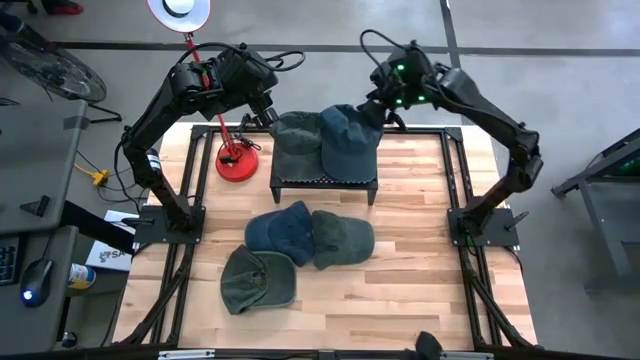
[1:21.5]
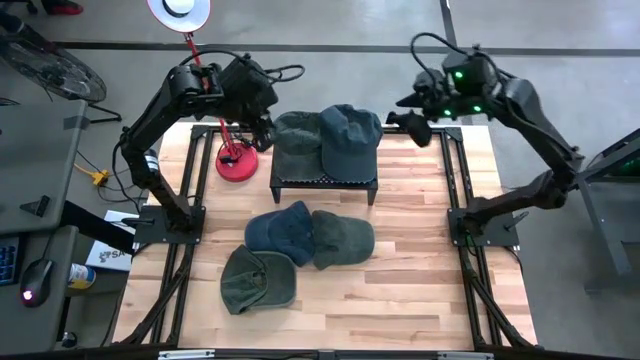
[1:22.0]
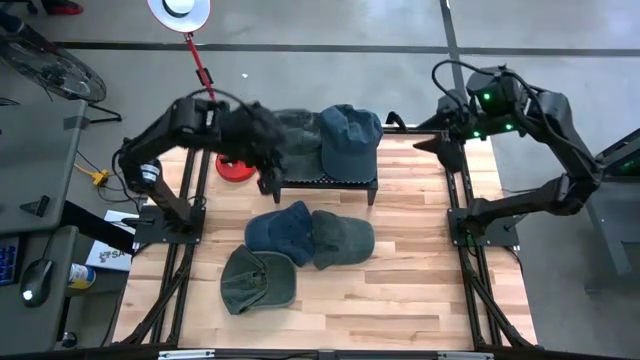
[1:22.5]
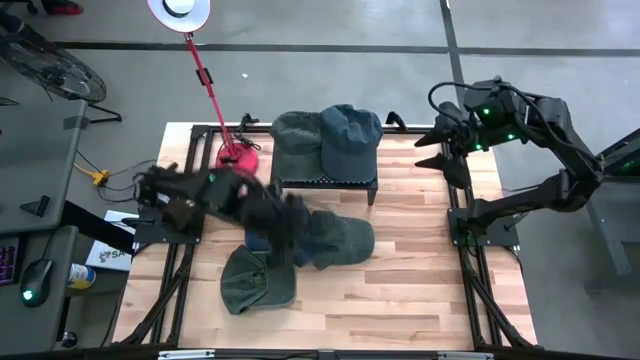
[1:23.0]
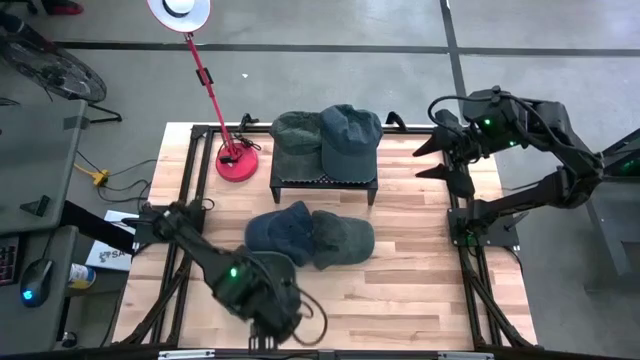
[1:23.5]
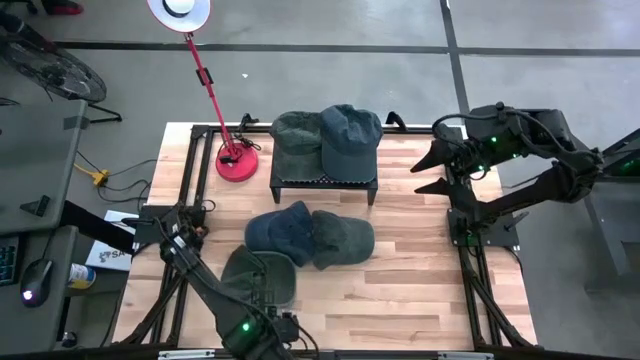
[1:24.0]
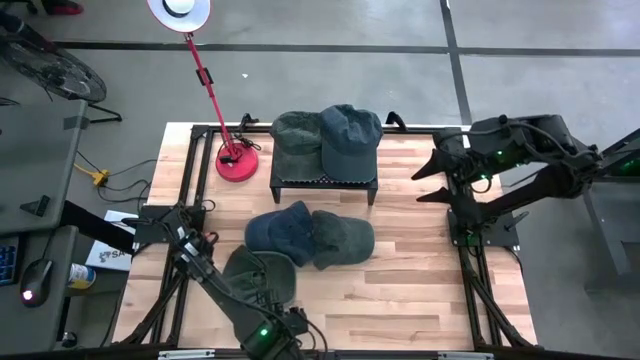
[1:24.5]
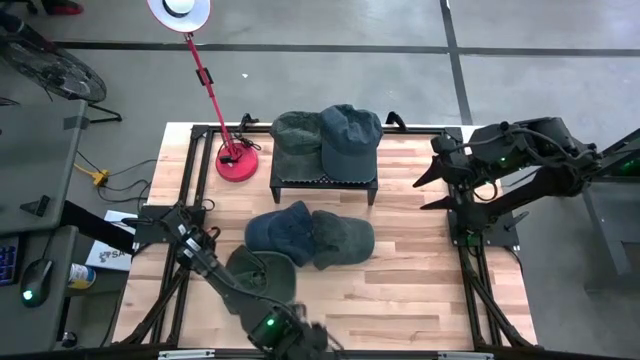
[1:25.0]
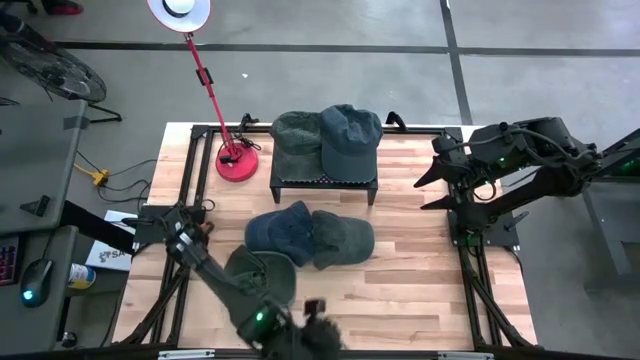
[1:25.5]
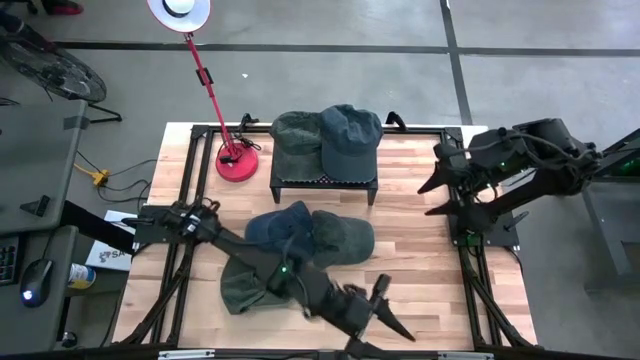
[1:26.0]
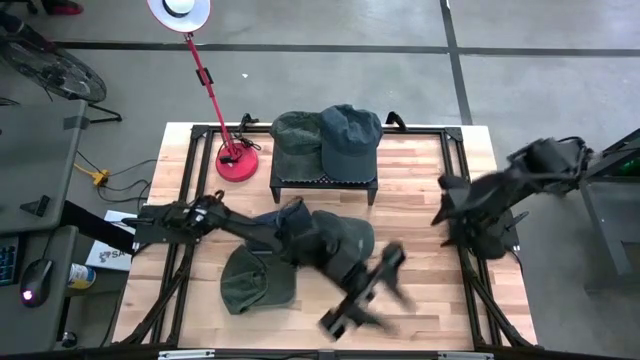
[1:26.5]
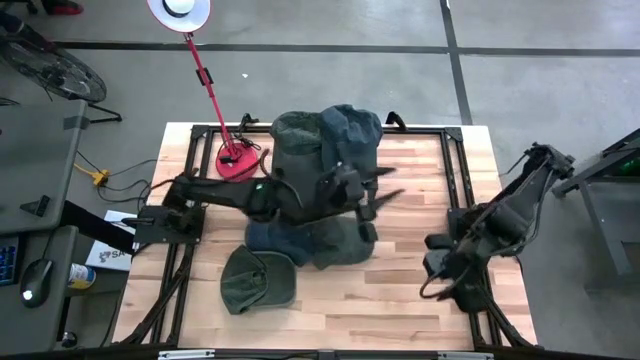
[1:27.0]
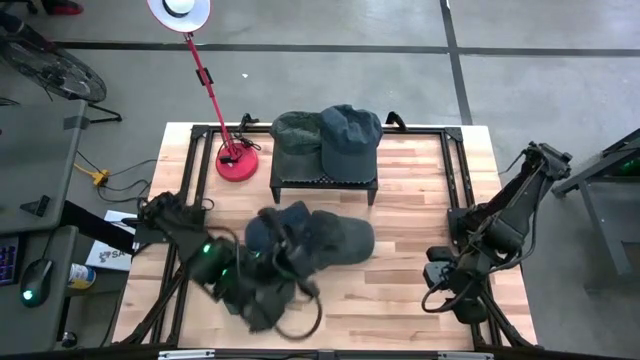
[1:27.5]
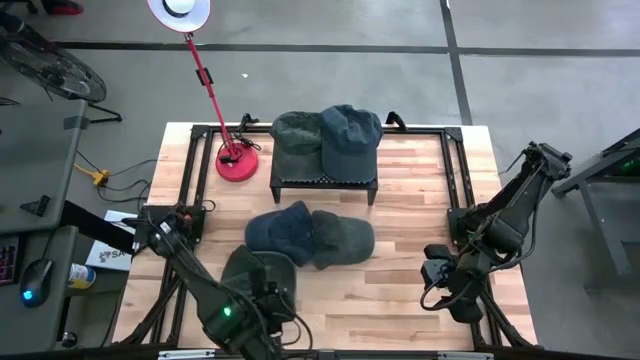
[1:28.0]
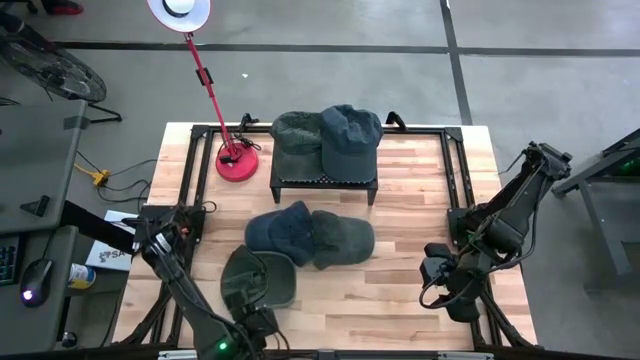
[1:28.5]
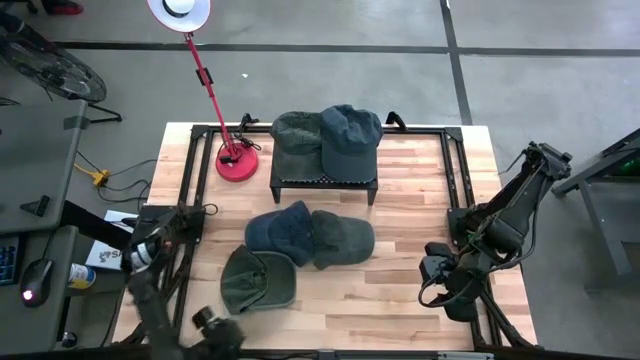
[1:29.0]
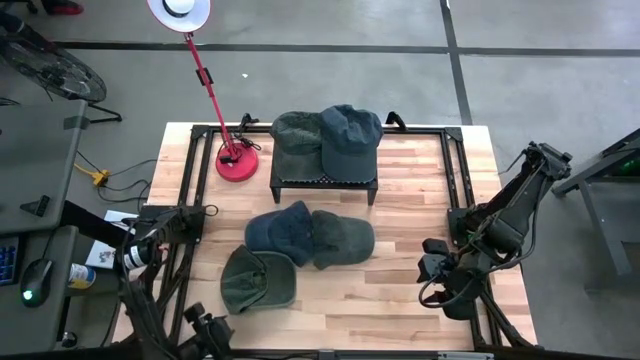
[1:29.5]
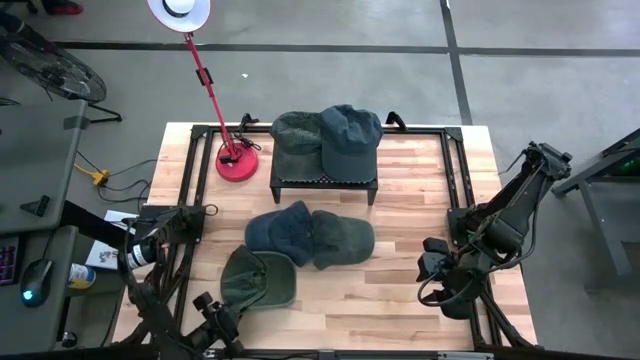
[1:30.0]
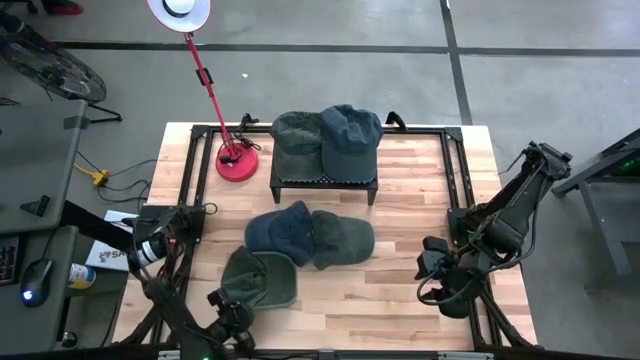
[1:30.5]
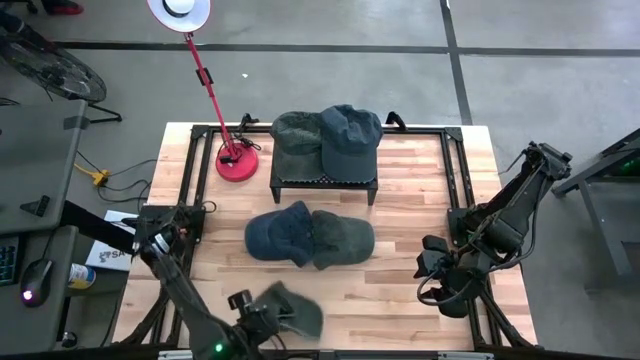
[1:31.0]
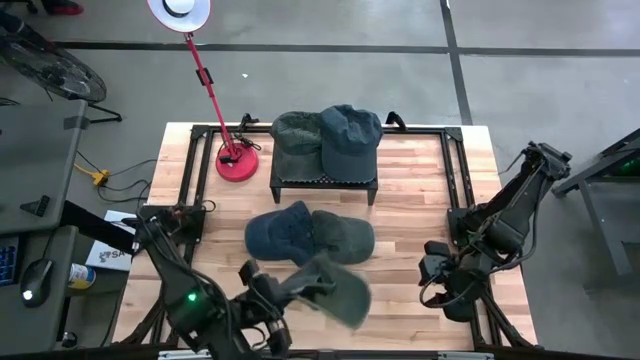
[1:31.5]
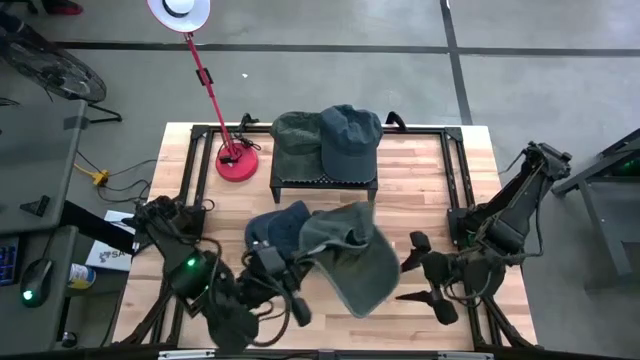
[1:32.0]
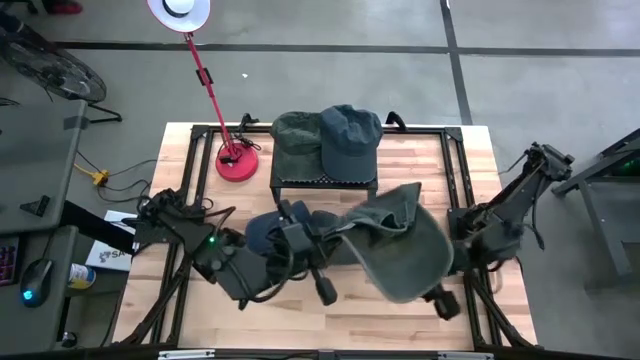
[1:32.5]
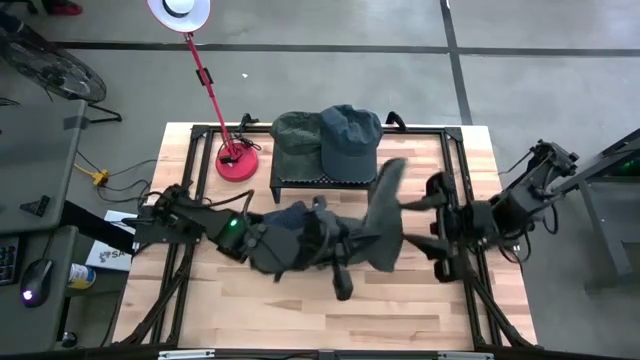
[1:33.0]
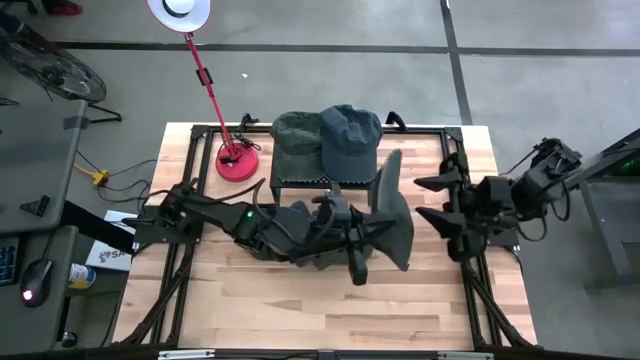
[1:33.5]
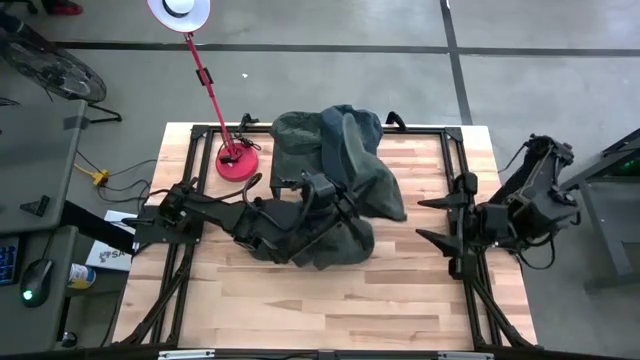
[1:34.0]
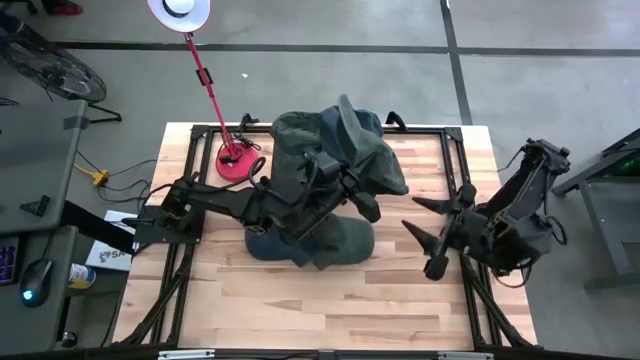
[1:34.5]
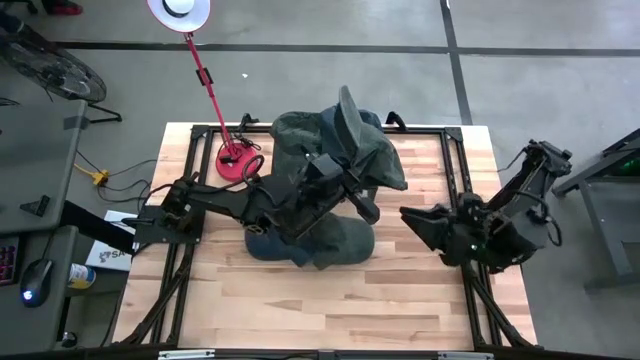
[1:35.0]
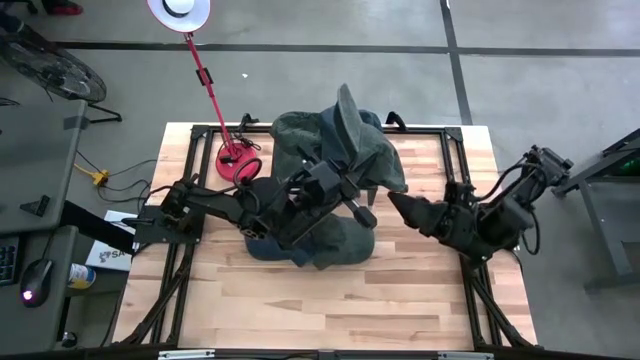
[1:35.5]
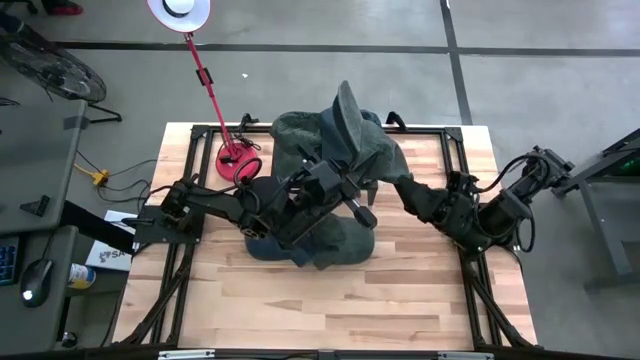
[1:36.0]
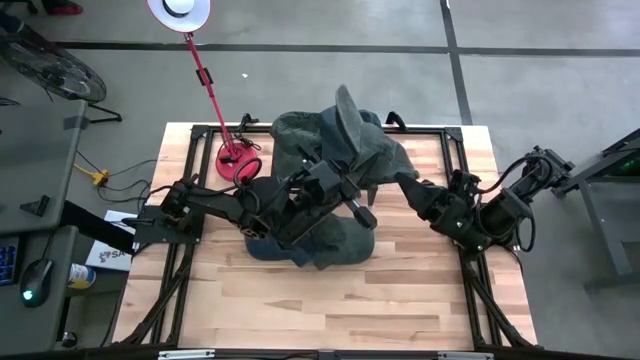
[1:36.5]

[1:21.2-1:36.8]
Task: Pick & Place hat
Stack the bottom gray cap on top of the other gray cap on the shelf

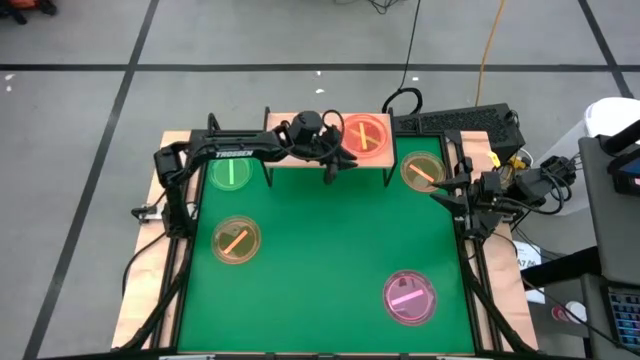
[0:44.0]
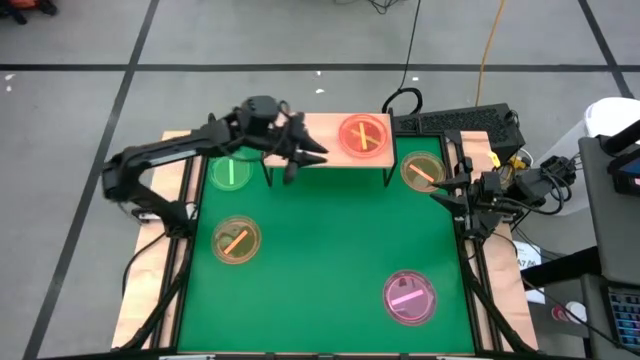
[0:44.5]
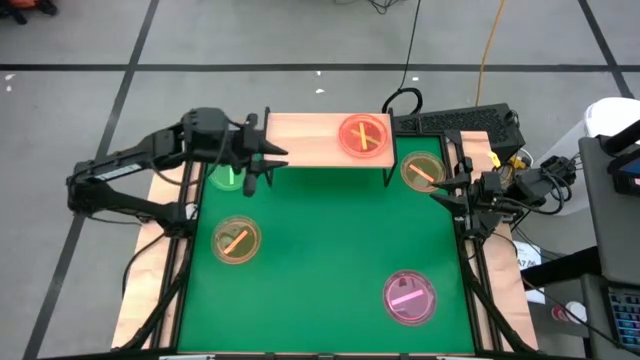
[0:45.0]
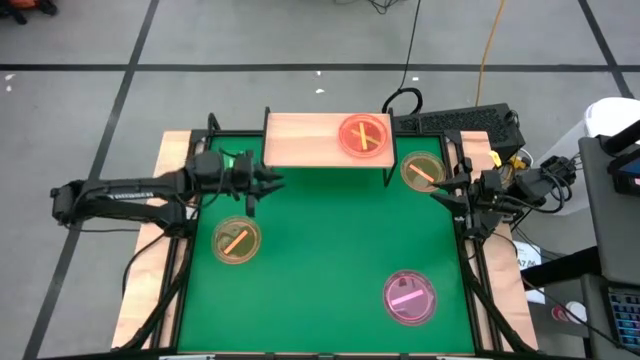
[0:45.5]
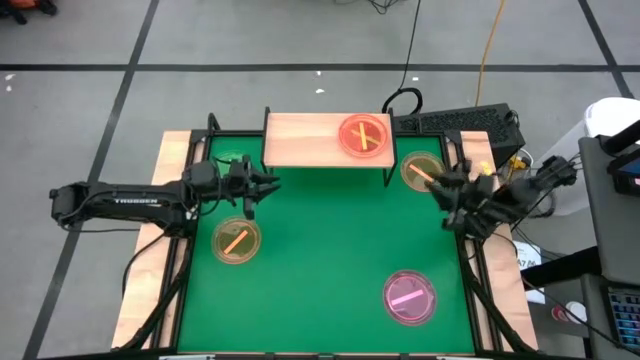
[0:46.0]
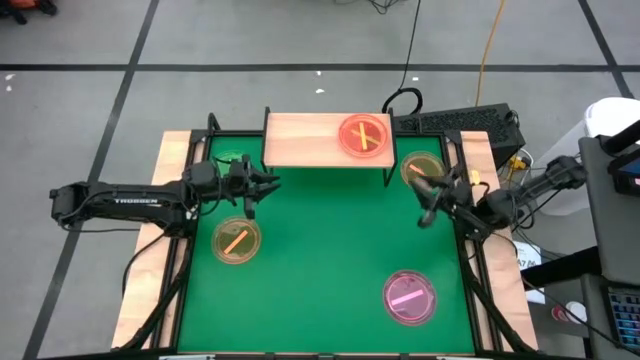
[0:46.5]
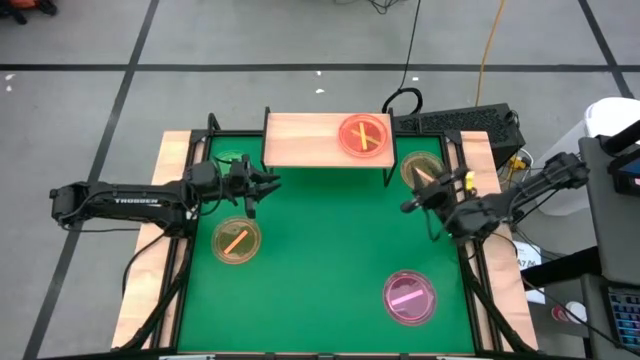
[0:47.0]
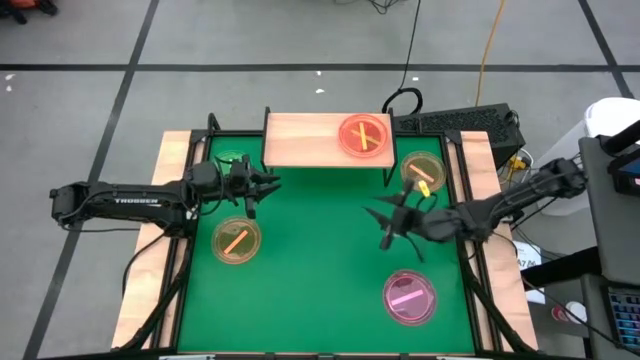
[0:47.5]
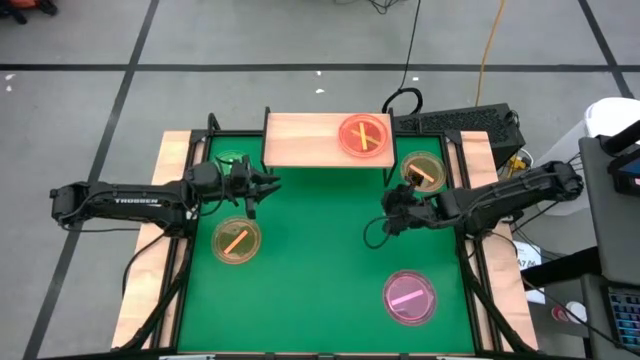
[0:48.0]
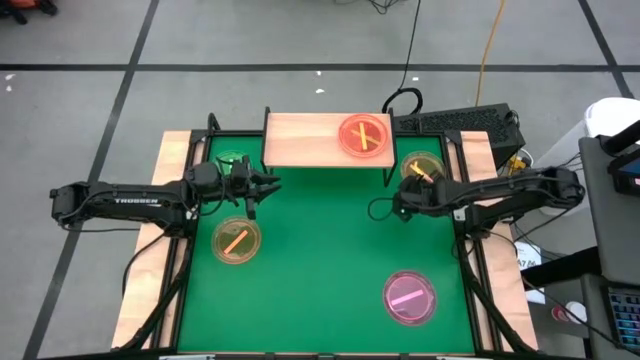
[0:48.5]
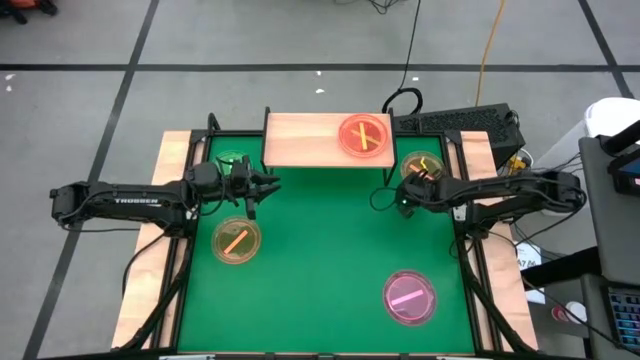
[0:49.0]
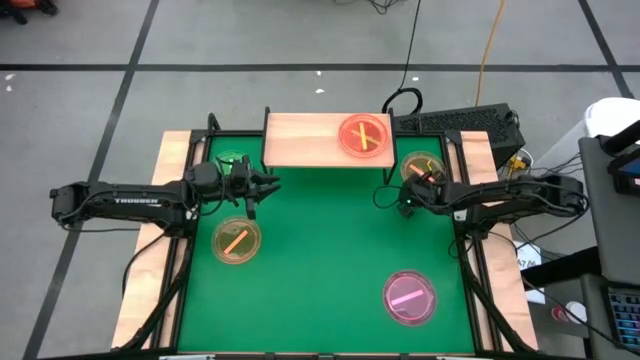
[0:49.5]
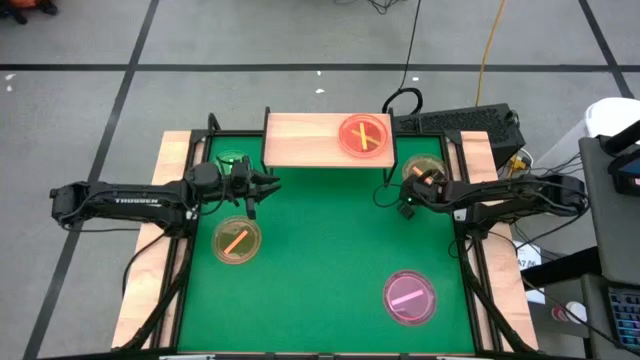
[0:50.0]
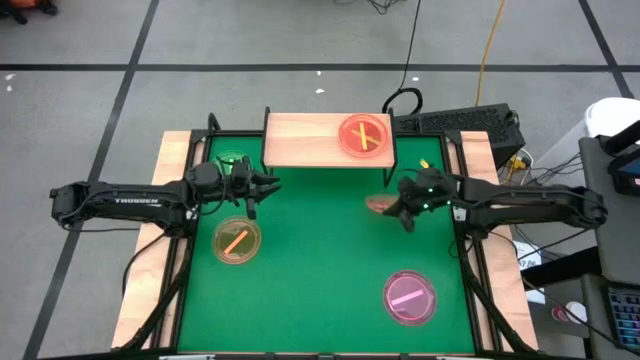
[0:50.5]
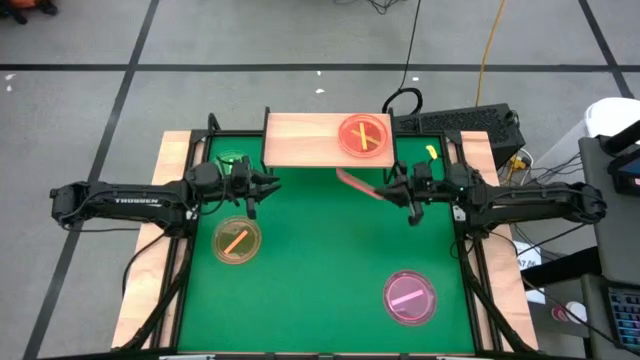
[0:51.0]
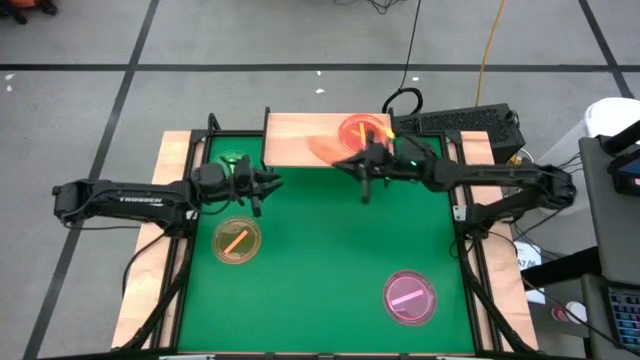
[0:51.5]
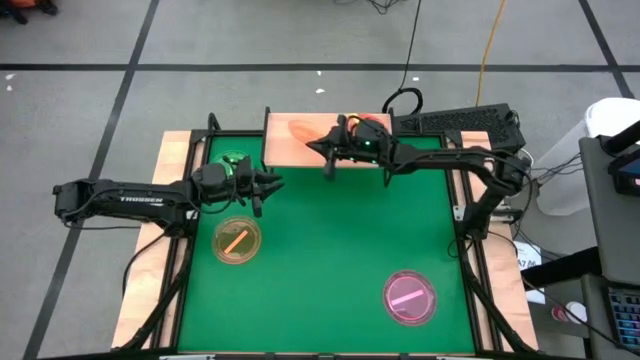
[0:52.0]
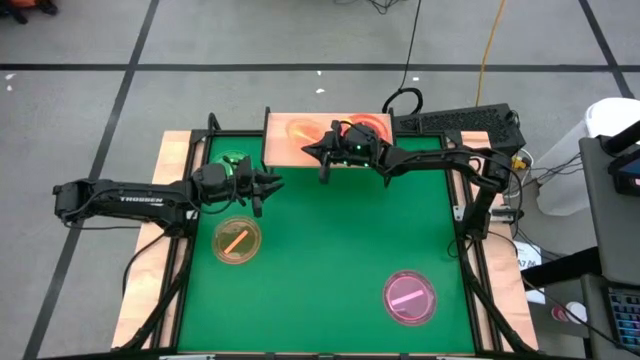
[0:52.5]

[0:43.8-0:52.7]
Task: Place and stack plates onto a shelf
Put the orange plate on the shelf
